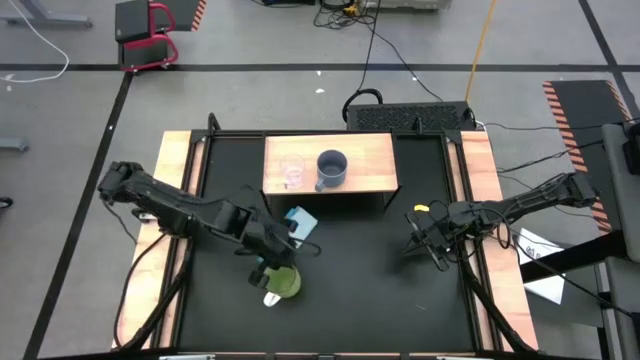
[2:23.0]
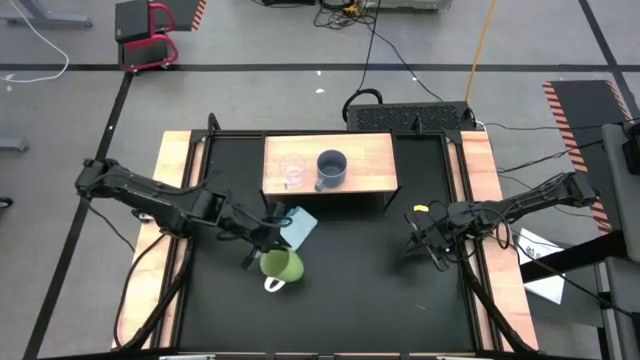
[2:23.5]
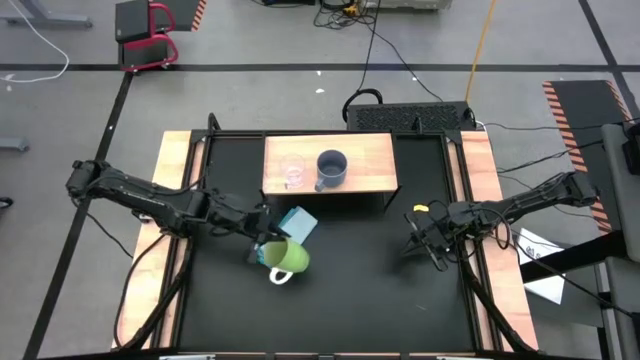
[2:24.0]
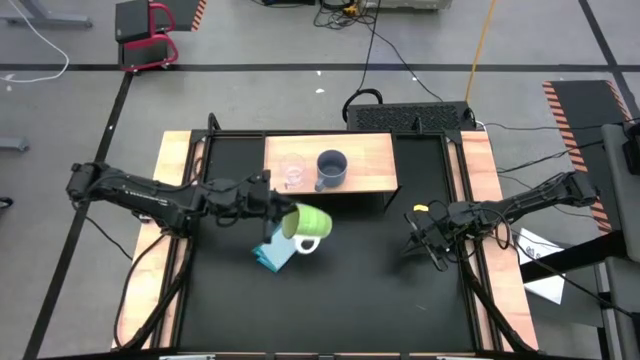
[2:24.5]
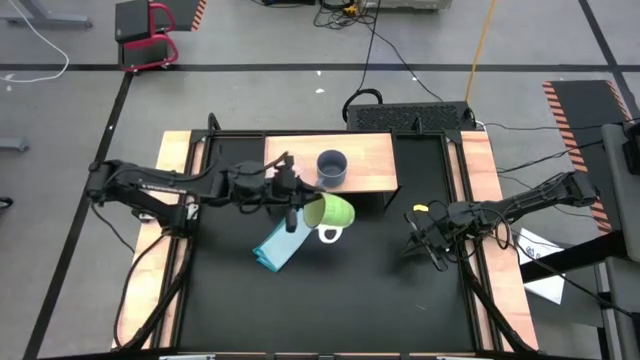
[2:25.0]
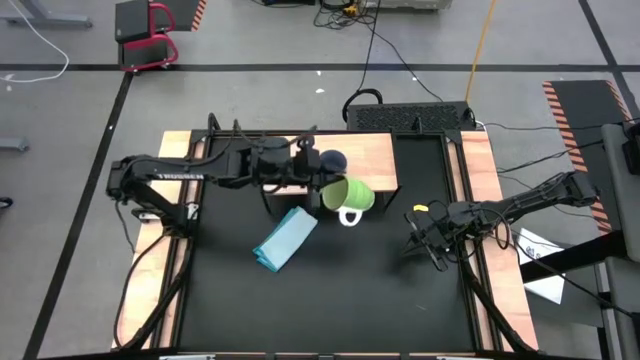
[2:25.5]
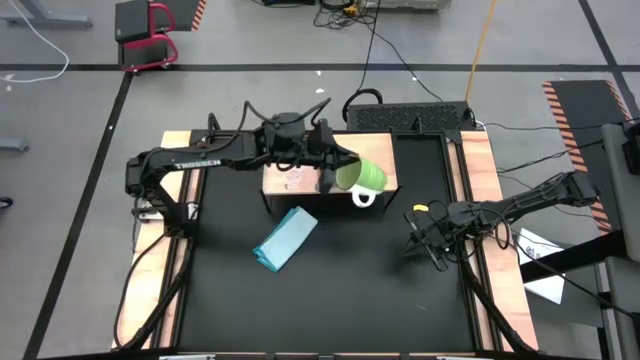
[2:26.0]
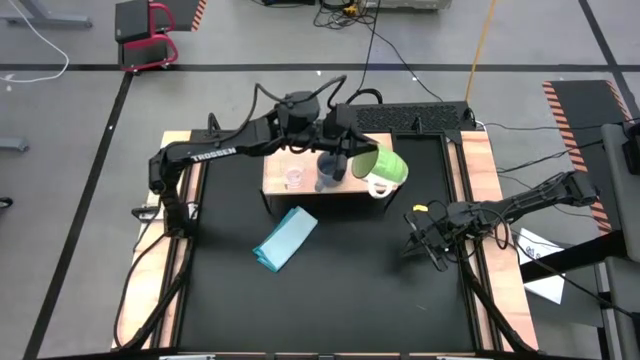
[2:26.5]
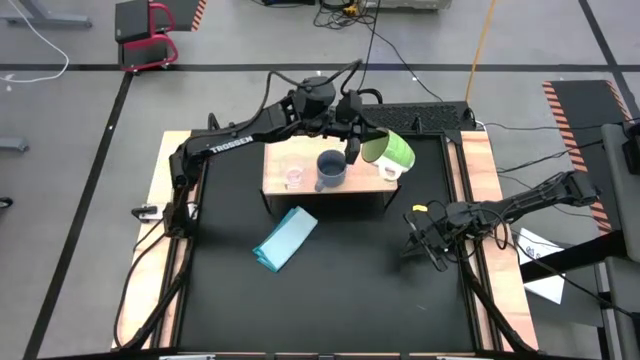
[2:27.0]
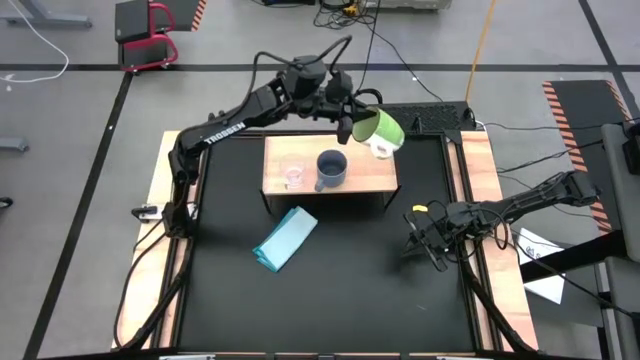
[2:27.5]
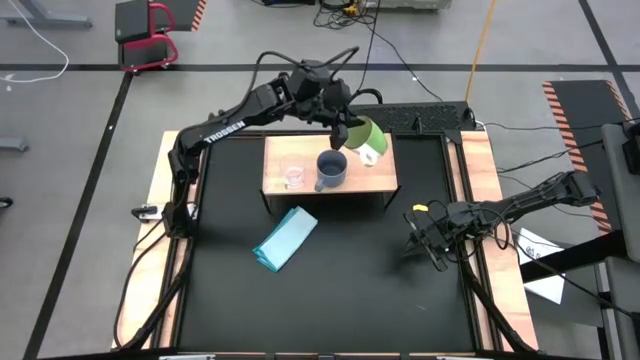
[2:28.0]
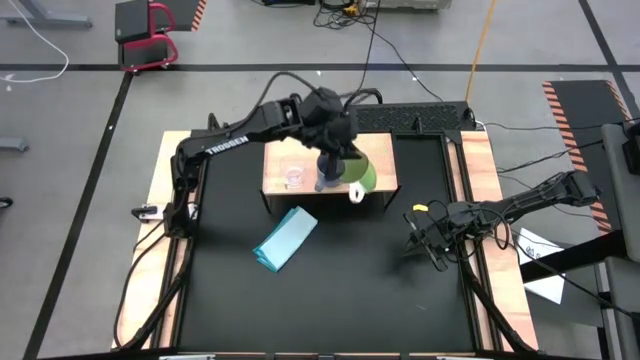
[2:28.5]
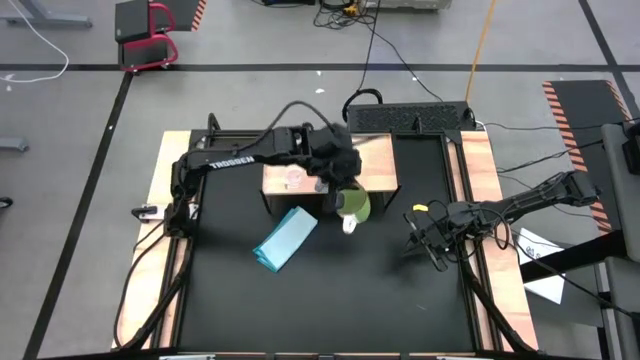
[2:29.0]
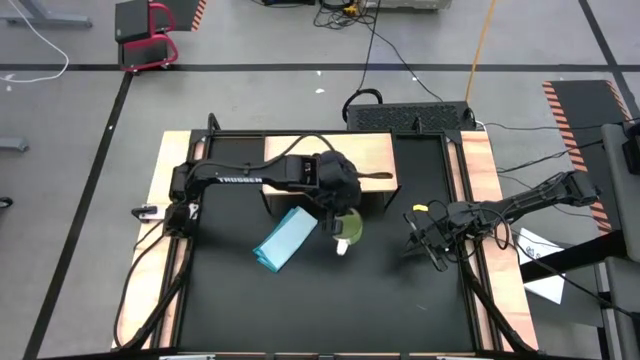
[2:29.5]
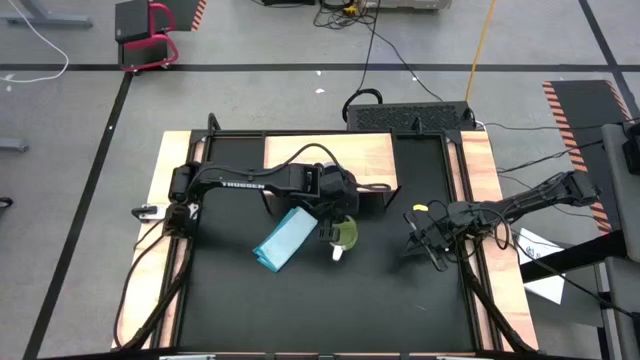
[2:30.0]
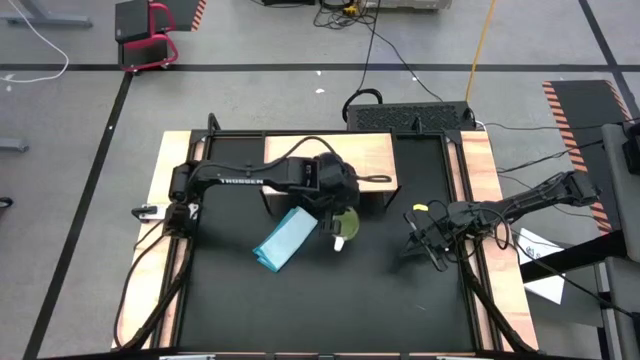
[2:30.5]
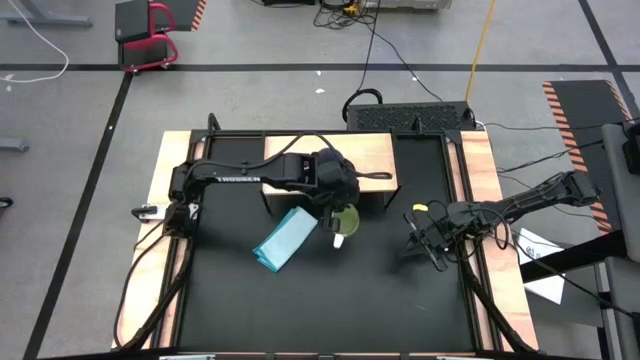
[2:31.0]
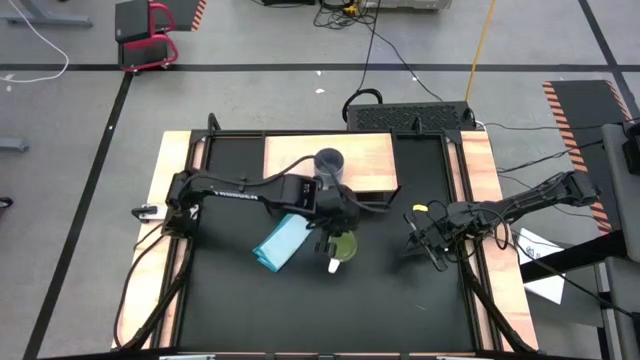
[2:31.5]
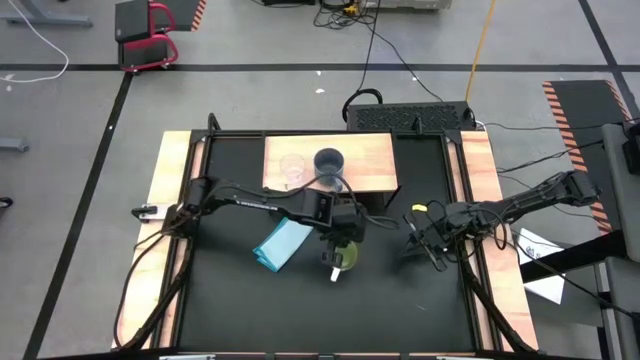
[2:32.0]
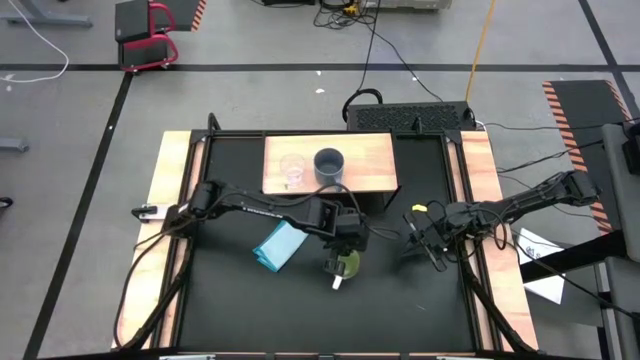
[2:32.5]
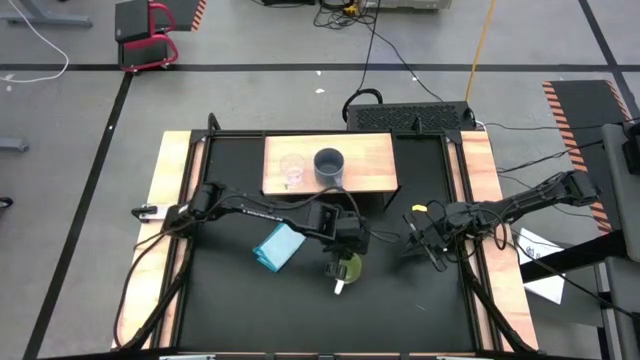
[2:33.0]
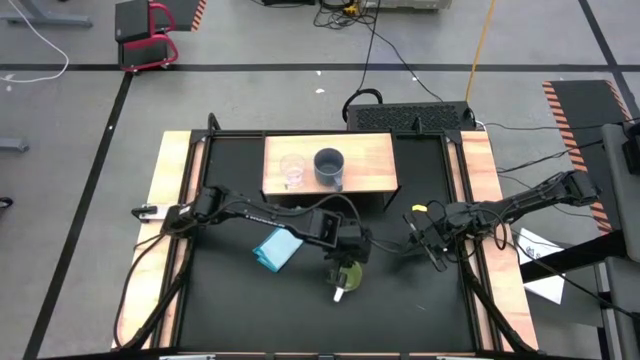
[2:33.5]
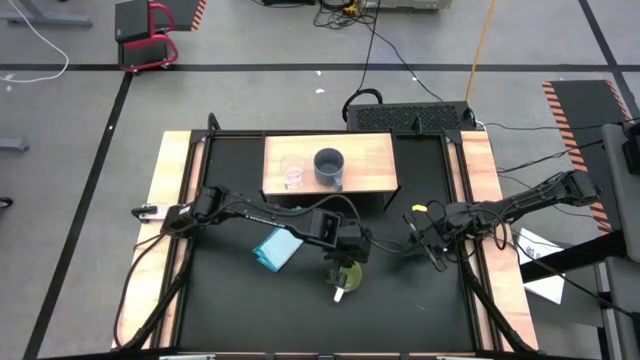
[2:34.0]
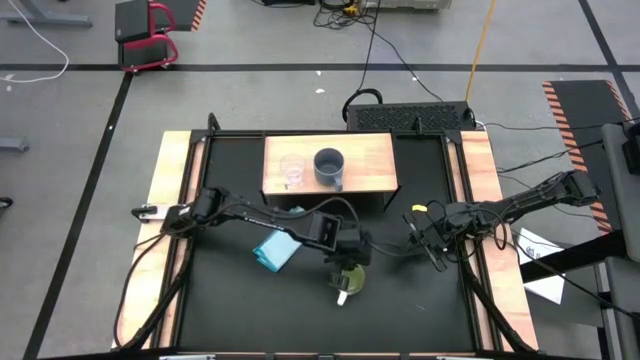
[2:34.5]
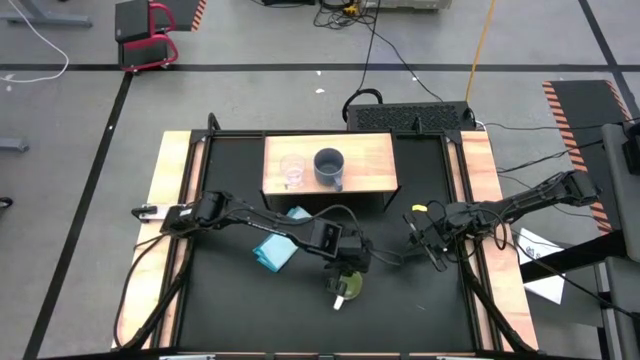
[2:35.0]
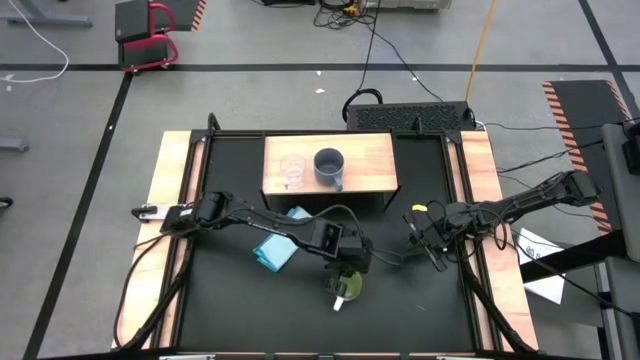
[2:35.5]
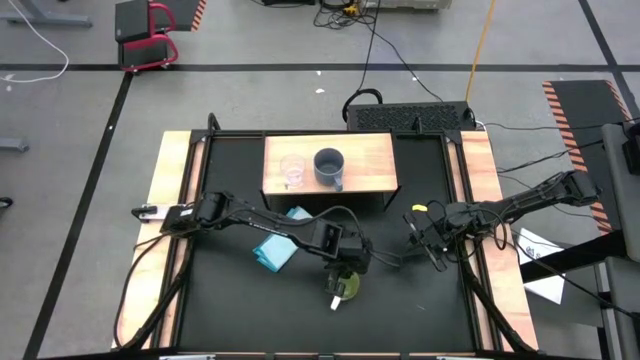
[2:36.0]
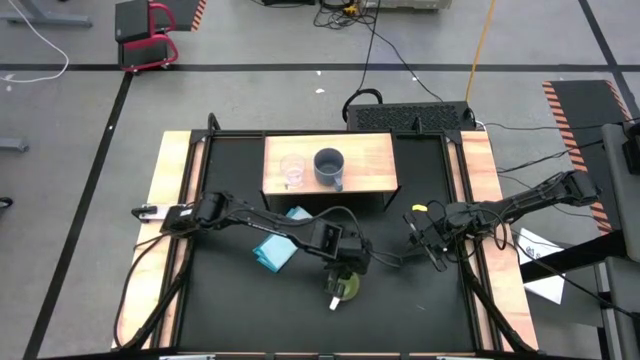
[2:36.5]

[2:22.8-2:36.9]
Task: Stack small to large cups/mugs on shelf
Put the green mug on the shelf

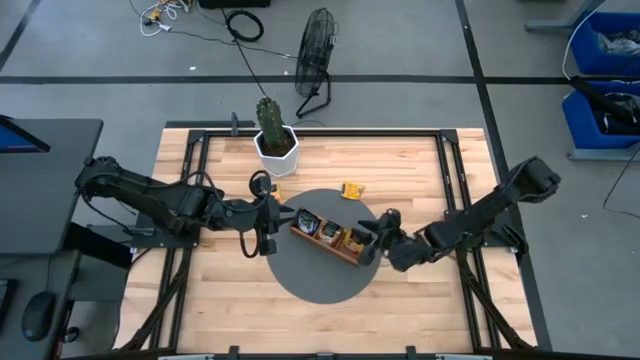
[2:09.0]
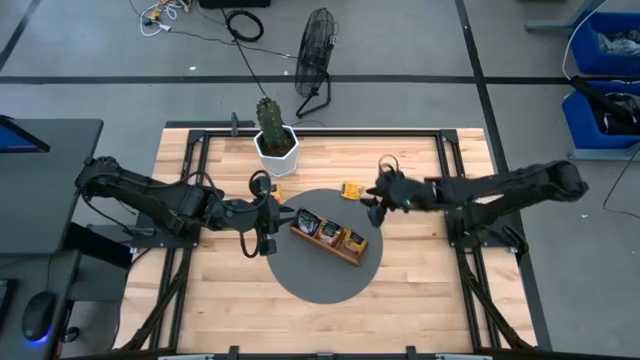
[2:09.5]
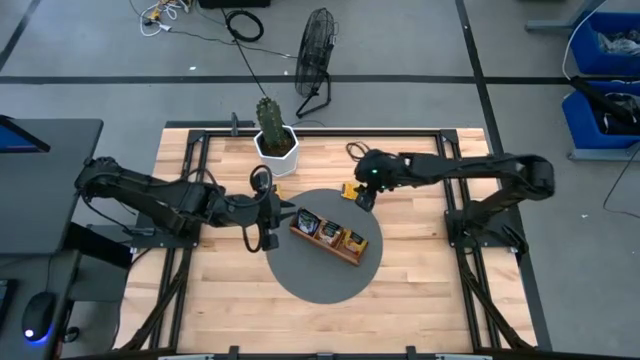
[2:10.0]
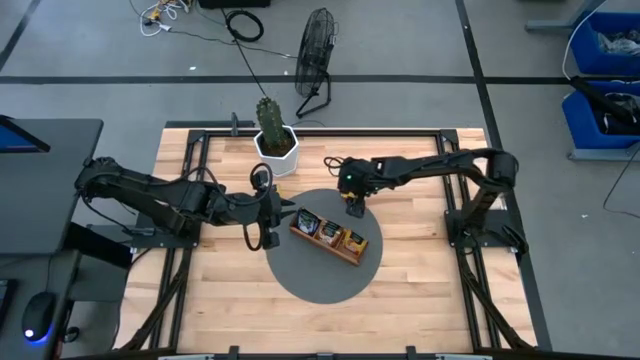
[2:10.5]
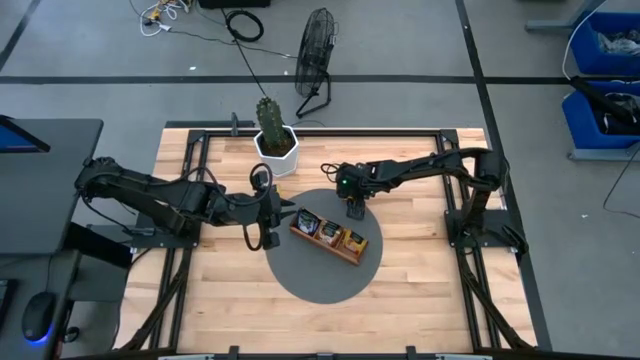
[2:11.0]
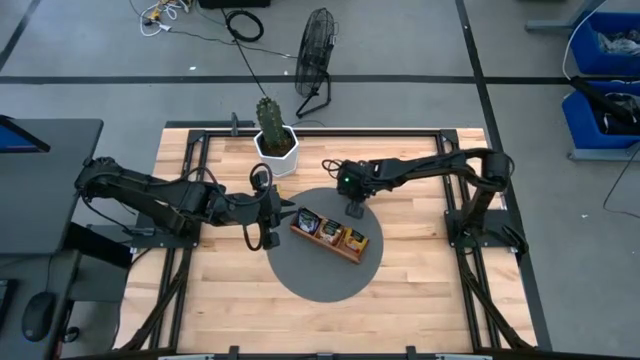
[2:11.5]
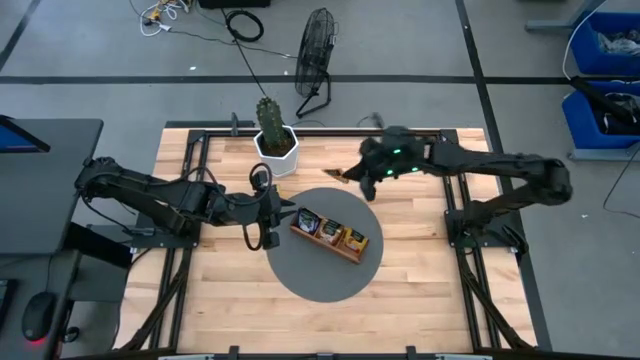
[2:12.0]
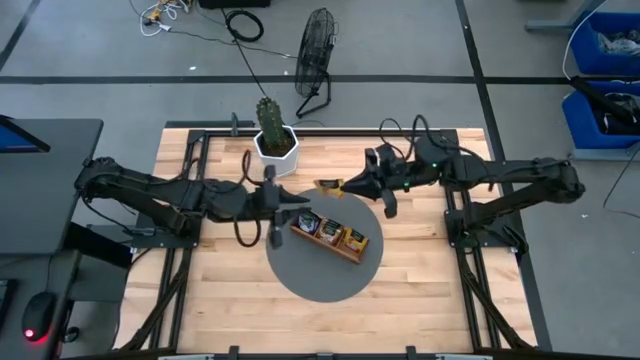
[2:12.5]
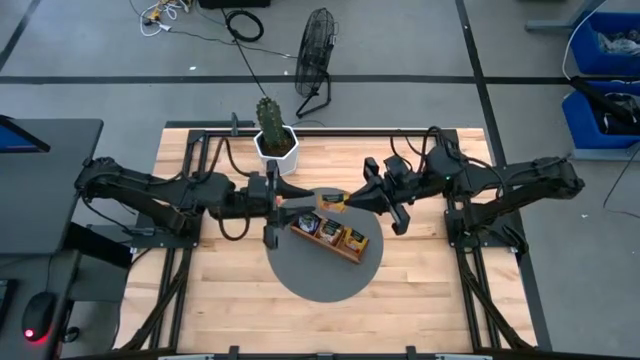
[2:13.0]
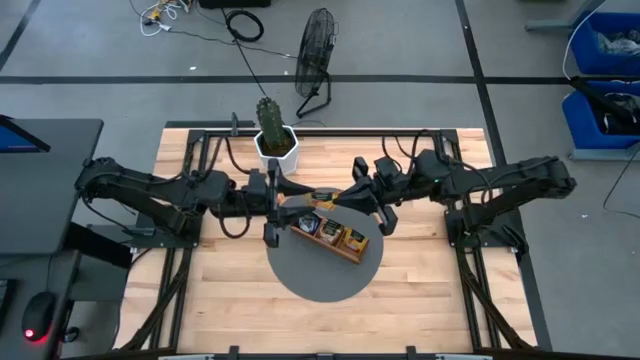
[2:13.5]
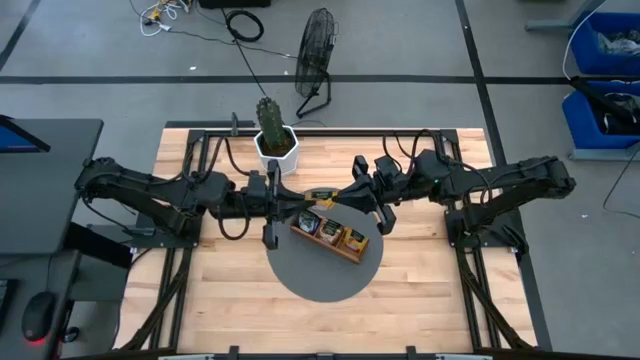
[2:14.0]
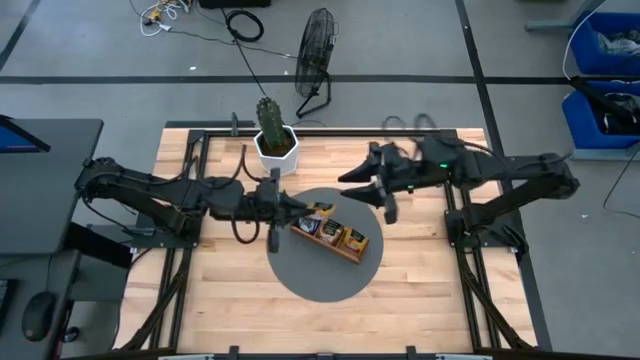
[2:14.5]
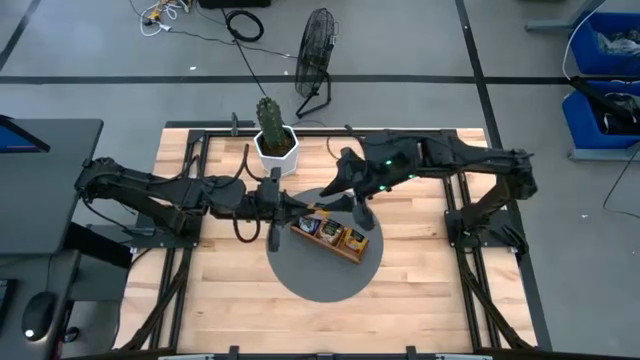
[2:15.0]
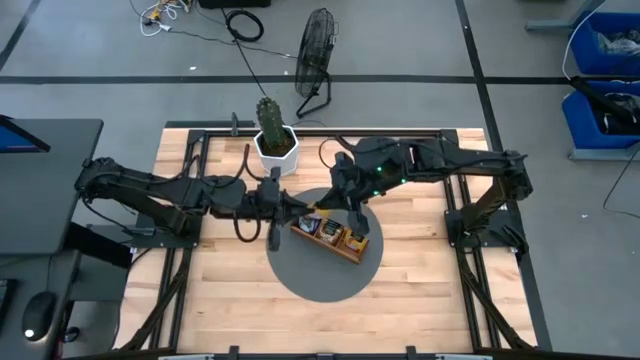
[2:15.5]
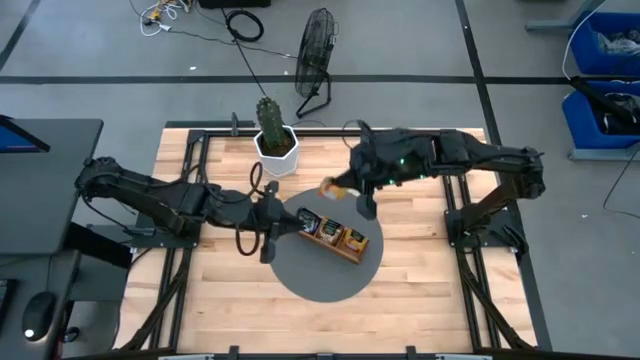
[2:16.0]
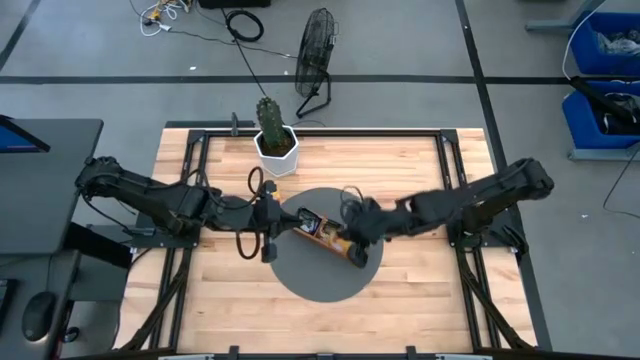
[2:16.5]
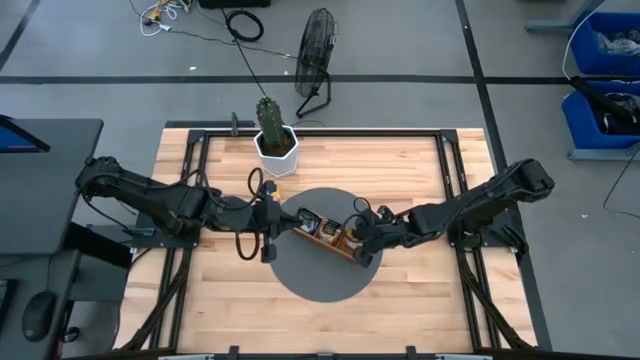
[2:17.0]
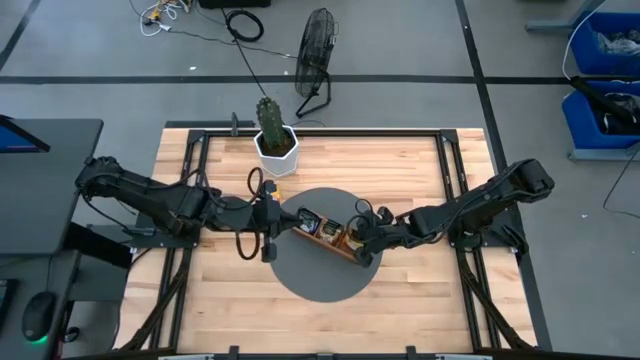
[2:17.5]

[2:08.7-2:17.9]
Task: Pick & Place Tea
Put the orange tea bag into the right section of the wooden organizer
